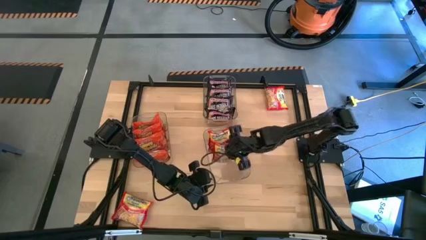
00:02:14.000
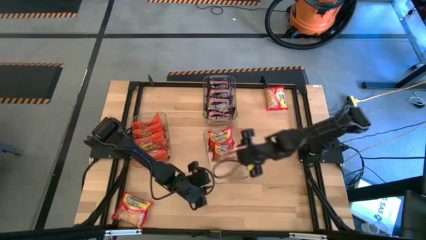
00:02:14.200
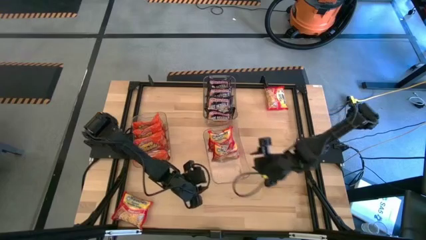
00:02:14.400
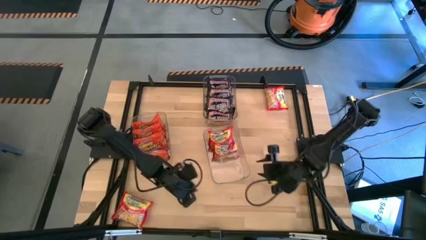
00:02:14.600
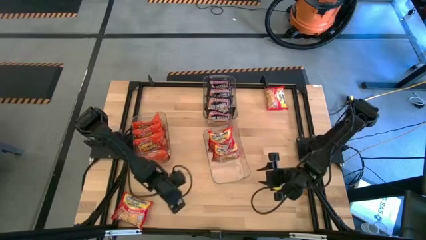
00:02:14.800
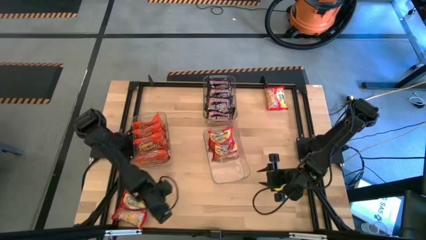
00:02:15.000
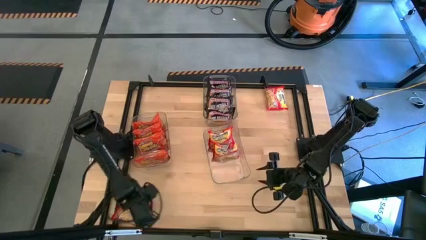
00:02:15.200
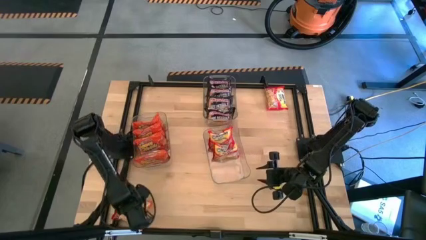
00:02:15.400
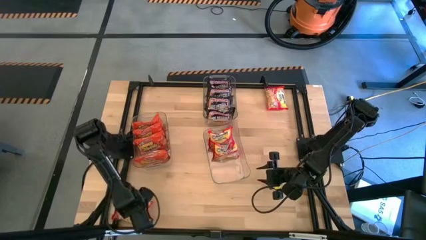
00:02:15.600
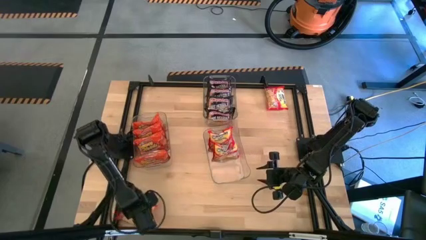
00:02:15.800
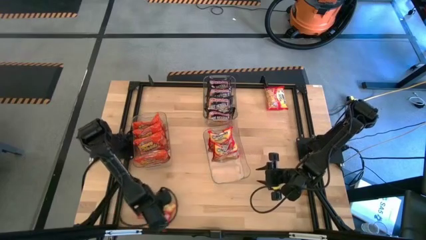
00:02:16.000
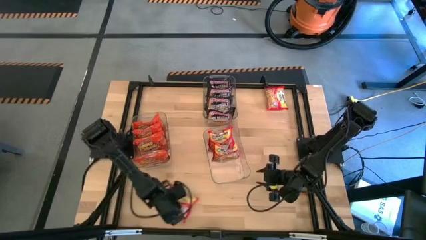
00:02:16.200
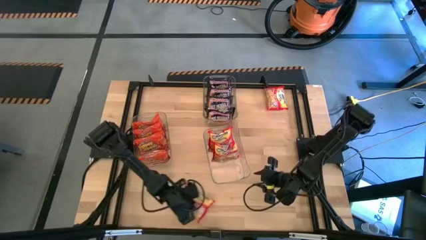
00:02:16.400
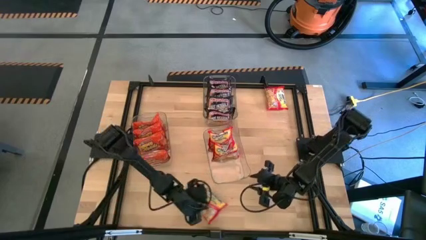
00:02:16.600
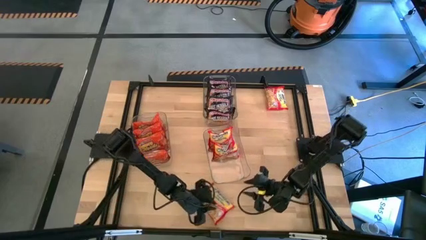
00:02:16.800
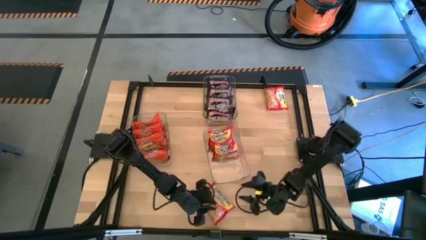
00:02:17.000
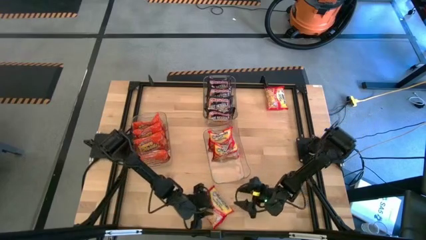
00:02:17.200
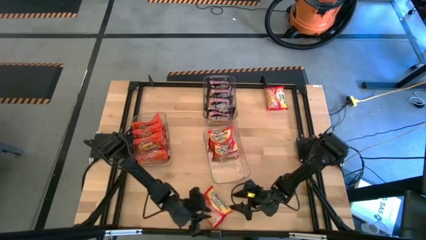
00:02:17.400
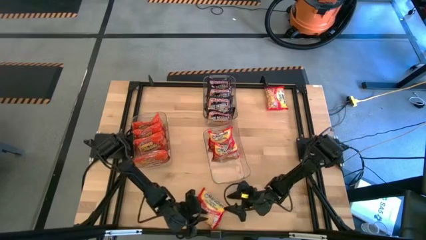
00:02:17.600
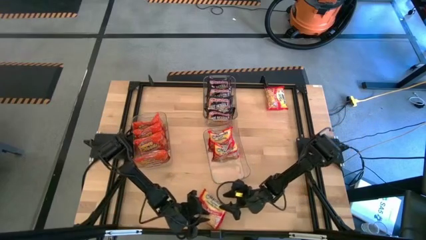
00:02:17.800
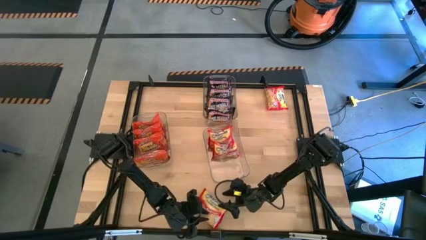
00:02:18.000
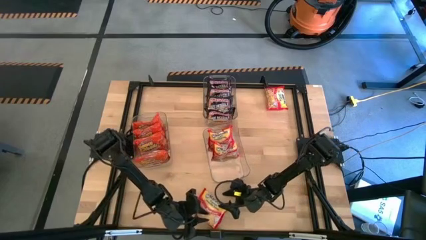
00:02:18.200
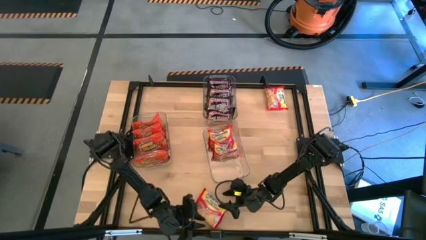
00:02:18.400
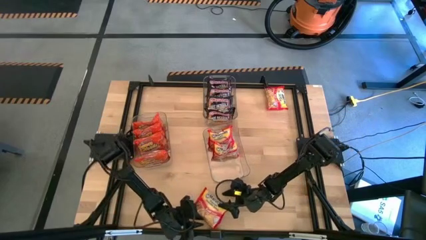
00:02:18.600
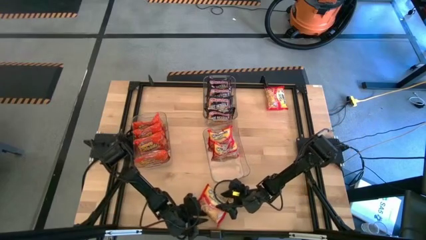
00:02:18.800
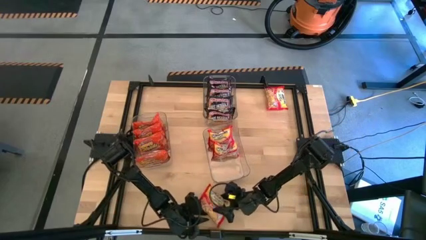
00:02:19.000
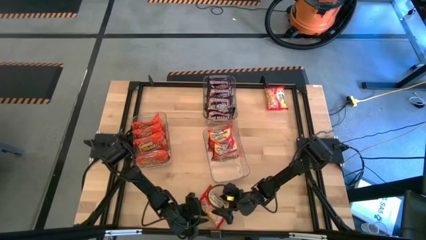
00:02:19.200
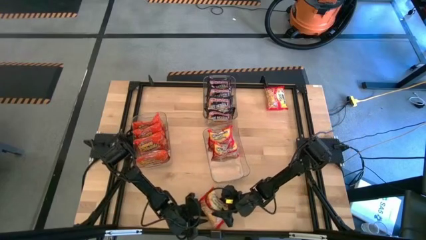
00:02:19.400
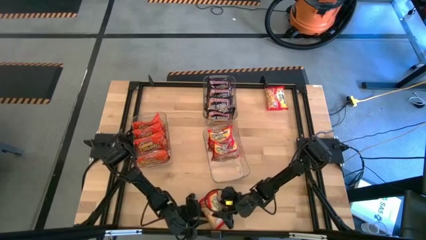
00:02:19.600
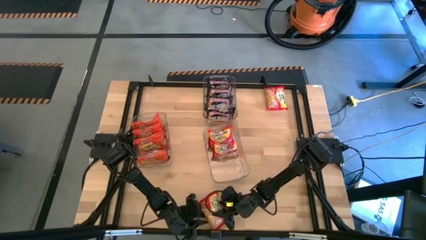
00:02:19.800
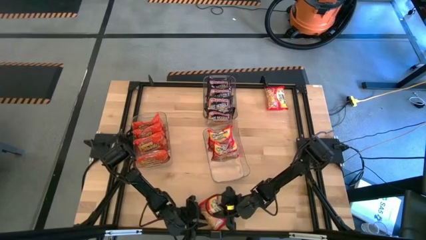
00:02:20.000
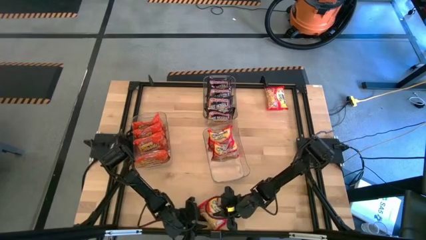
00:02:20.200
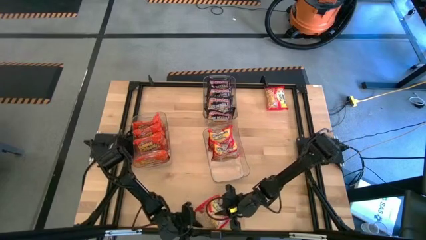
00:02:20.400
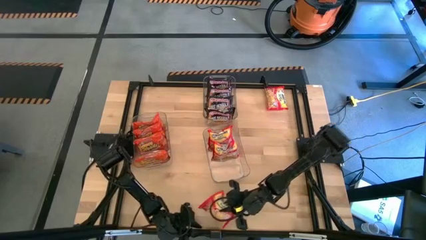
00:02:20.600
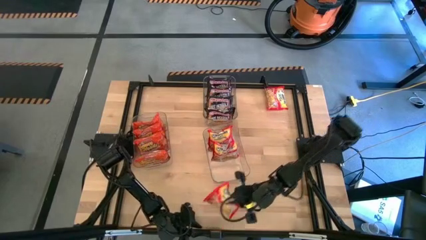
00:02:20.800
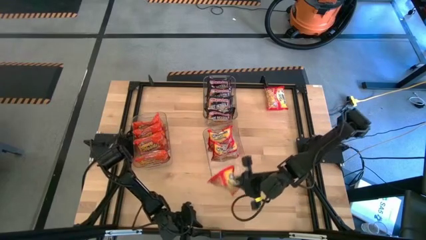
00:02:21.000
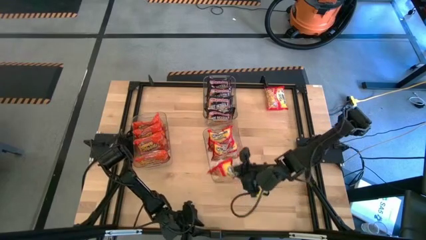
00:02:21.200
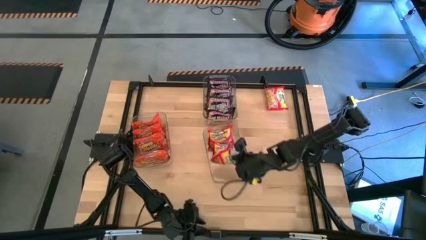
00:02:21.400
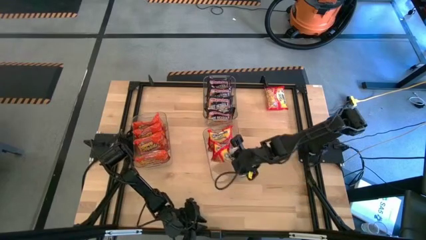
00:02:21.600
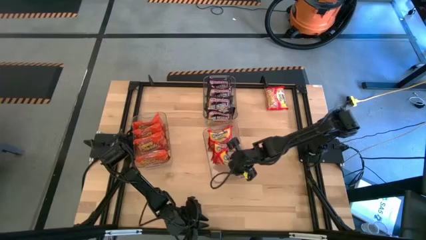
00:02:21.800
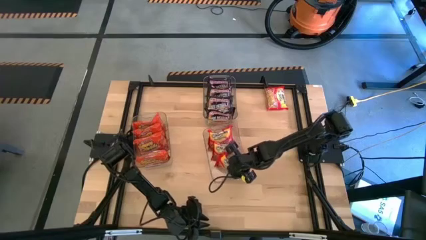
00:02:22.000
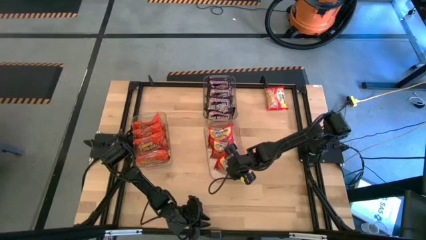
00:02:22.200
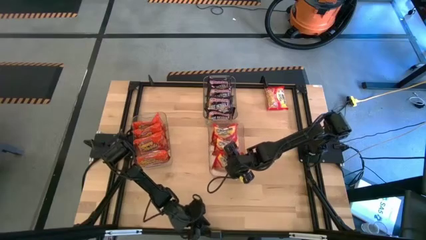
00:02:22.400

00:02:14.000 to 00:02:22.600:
Task: Sort Maruchan noodles
Put the red noodle pack into the right transparent bin

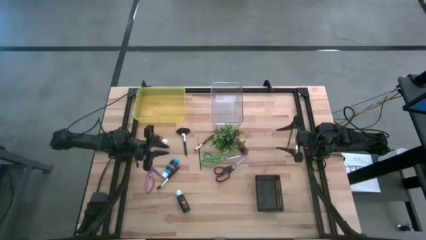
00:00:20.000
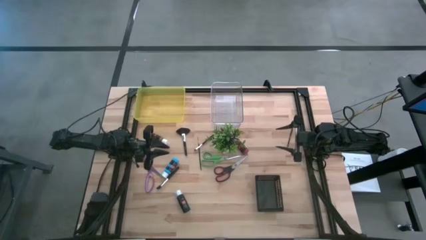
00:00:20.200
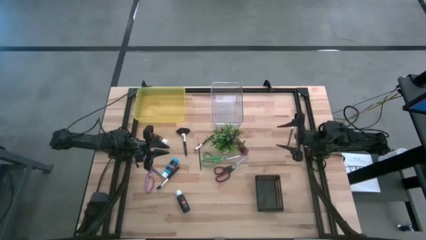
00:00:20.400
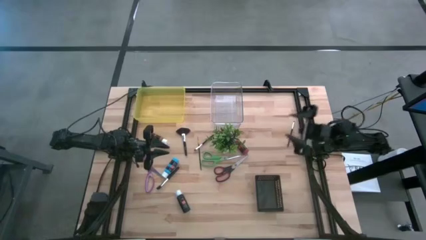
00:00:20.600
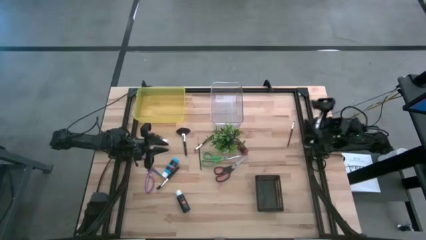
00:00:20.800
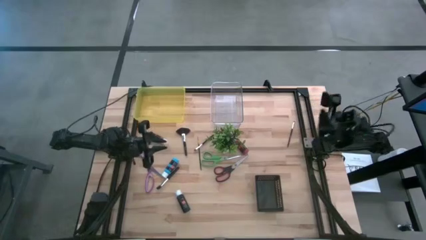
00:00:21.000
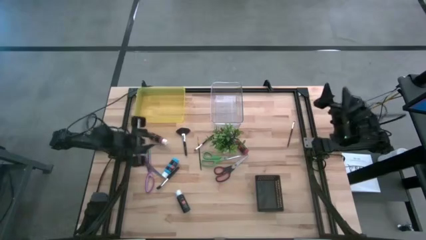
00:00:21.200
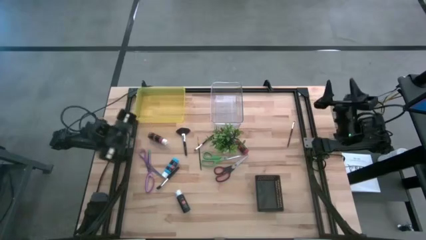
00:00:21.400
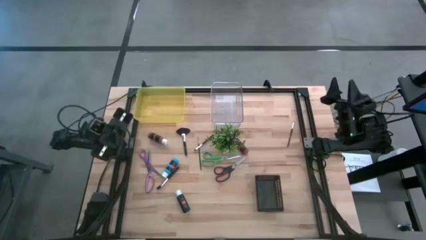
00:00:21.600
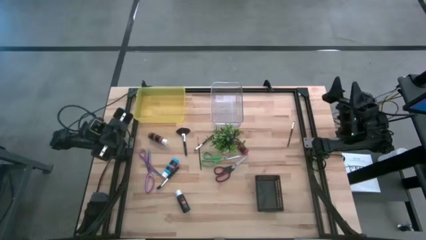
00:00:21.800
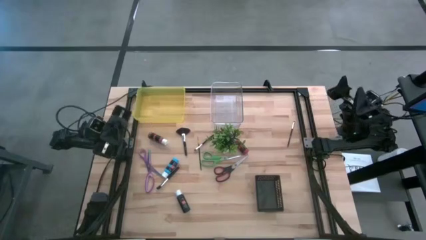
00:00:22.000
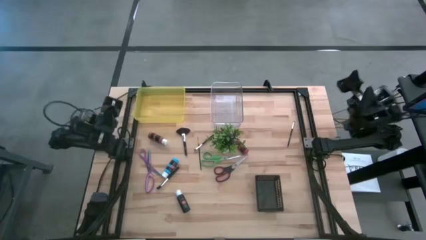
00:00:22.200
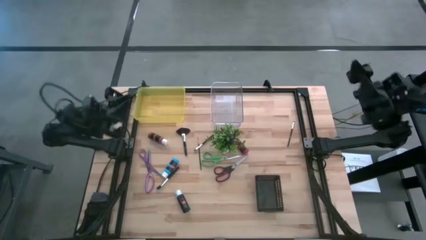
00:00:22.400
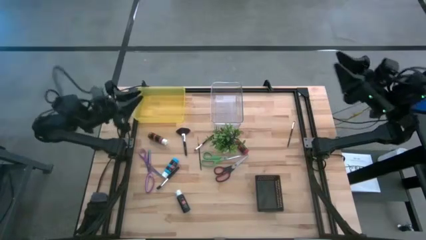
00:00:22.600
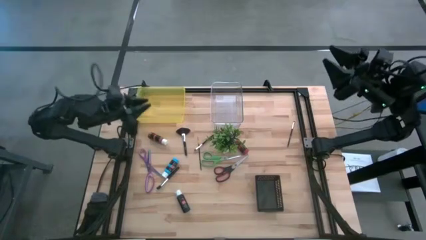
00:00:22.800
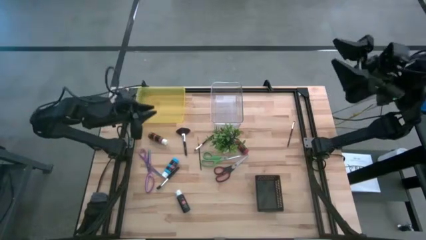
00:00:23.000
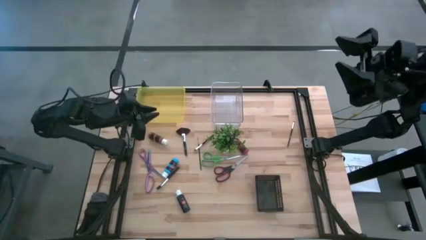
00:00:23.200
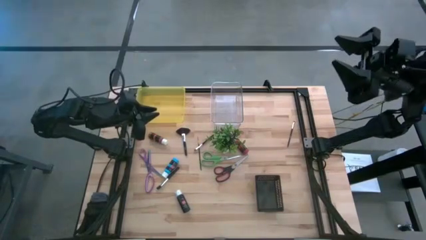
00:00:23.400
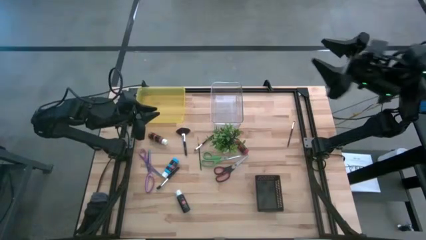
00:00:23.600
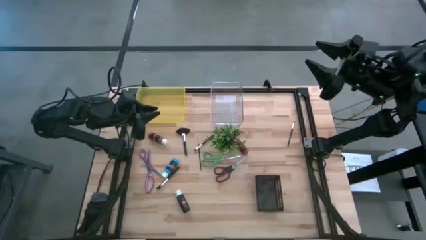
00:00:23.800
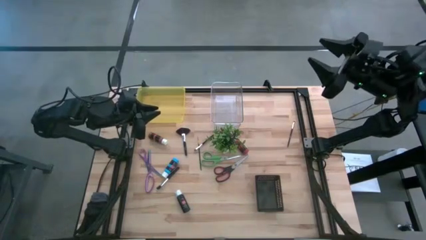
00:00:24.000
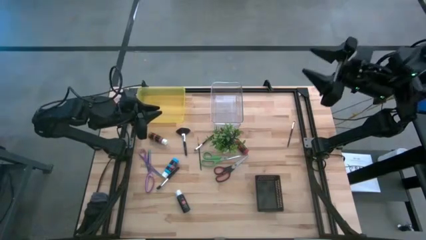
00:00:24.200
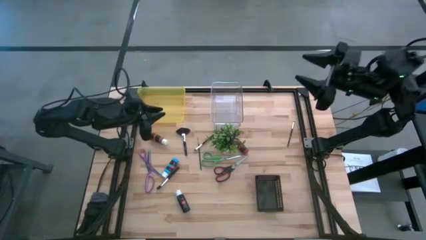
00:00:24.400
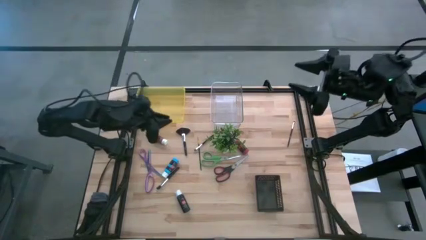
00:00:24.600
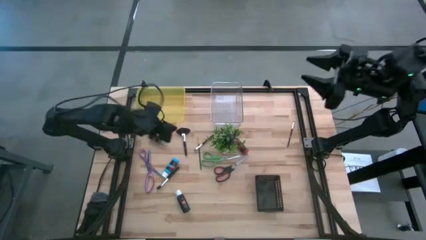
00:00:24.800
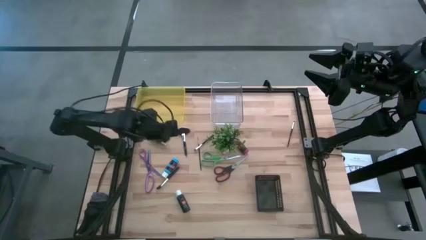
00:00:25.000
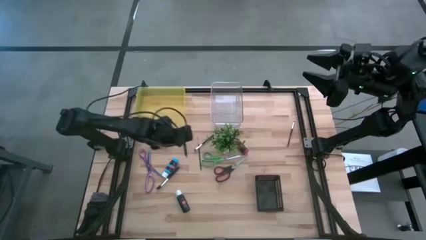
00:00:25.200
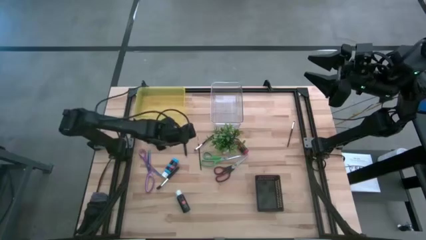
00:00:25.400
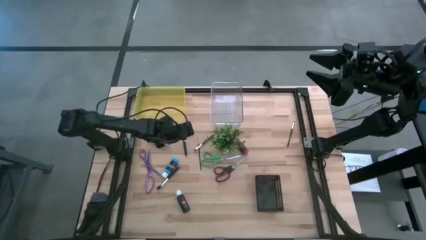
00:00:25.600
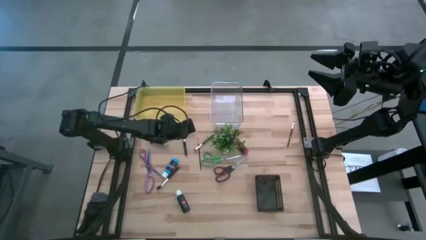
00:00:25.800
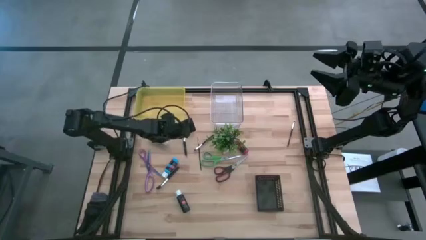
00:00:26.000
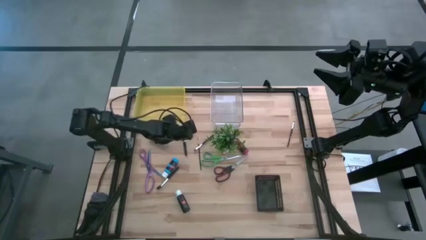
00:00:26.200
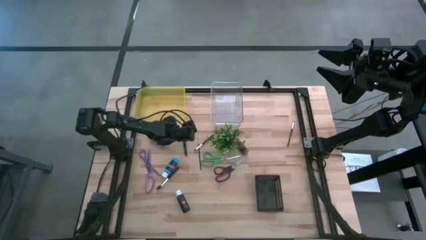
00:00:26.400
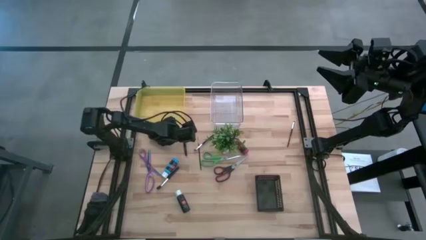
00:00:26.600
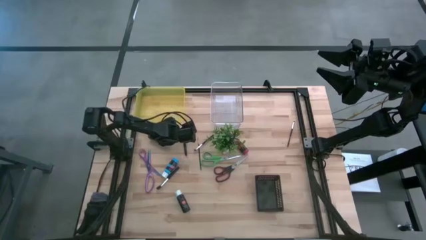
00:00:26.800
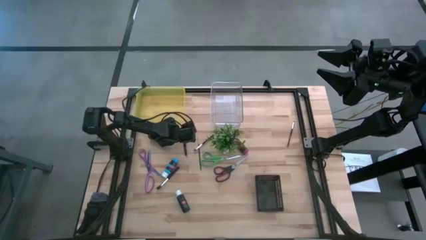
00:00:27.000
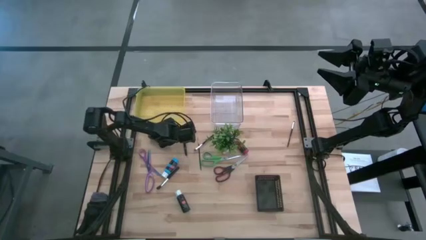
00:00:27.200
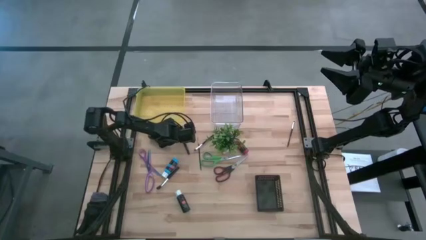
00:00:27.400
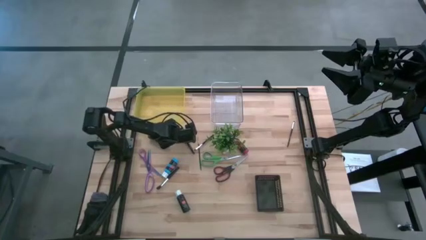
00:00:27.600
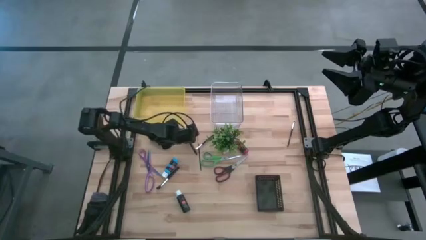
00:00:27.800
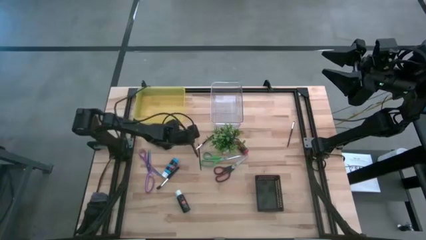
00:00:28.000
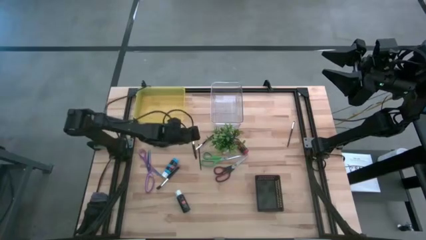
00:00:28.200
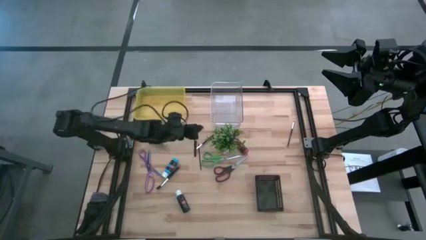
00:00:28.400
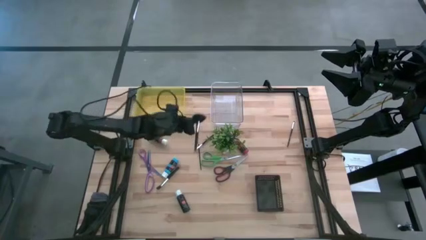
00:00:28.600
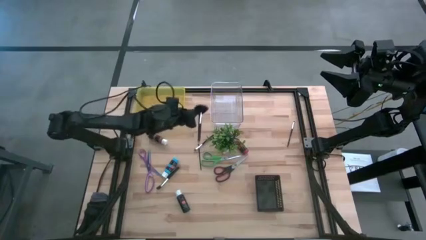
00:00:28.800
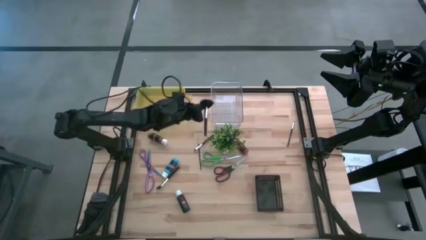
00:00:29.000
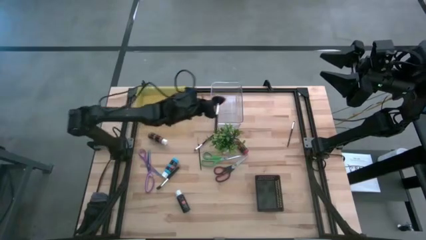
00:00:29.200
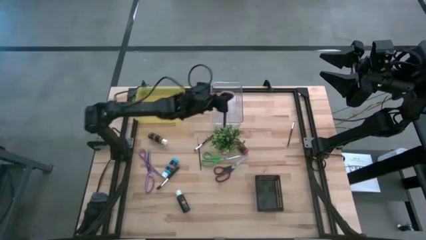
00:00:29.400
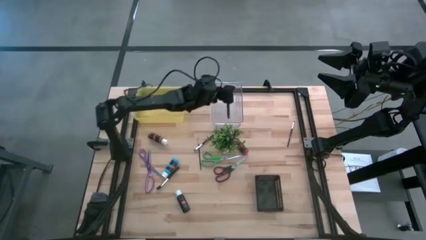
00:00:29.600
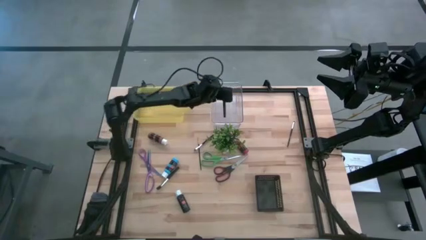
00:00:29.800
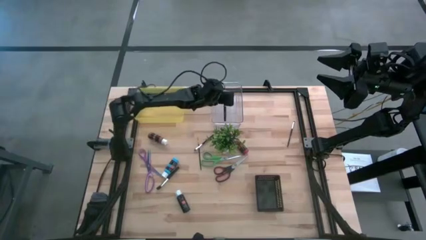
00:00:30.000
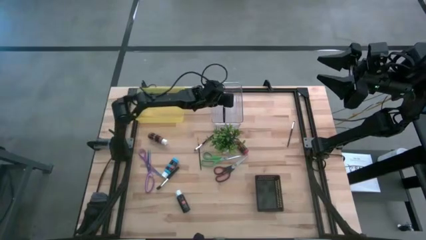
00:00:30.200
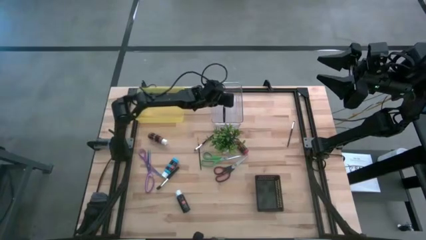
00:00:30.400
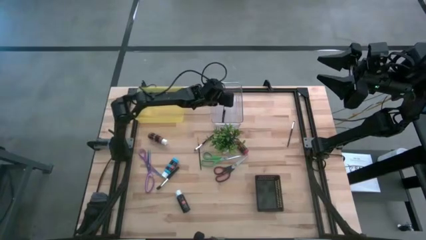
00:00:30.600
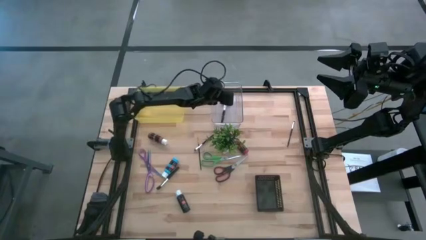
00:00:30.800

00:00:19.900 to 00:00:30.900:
Task: Pick & Place Paint Supplies
Put the highlighter brush into the transparent bin
